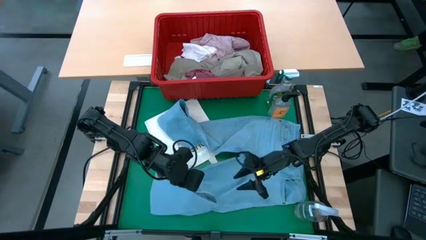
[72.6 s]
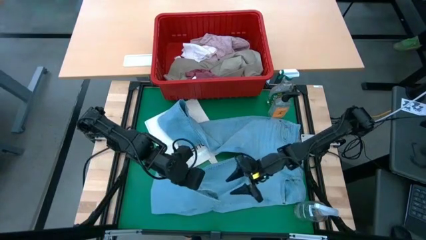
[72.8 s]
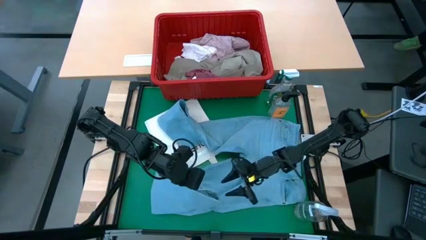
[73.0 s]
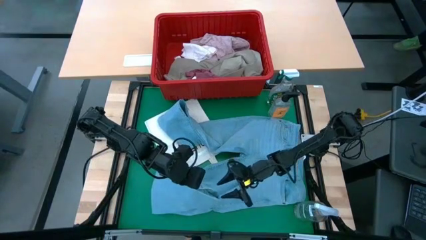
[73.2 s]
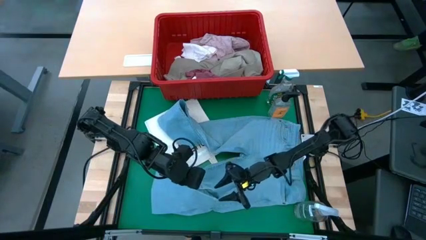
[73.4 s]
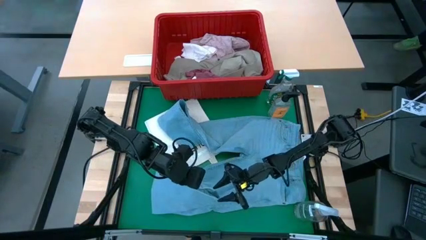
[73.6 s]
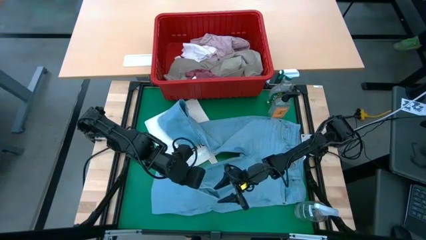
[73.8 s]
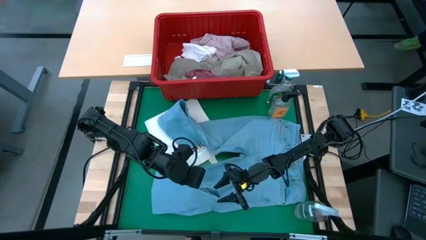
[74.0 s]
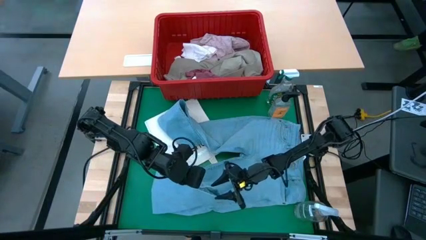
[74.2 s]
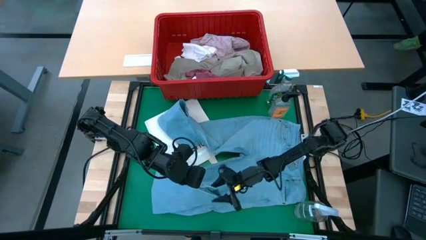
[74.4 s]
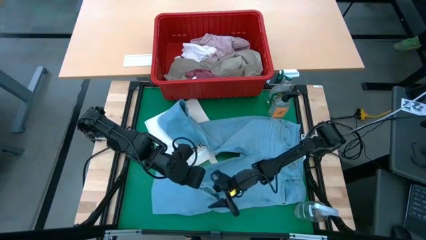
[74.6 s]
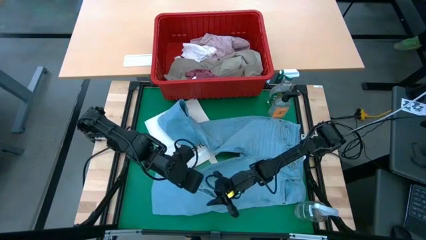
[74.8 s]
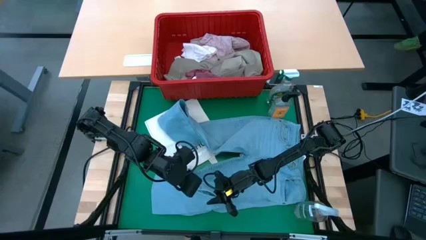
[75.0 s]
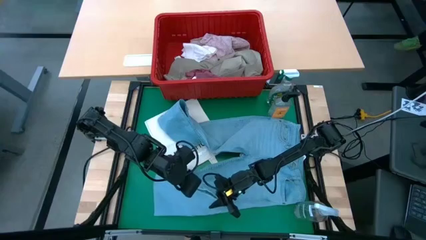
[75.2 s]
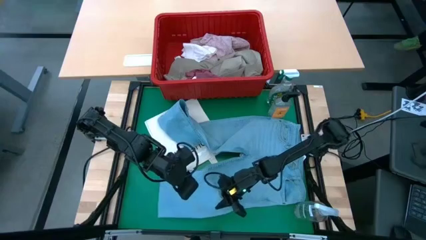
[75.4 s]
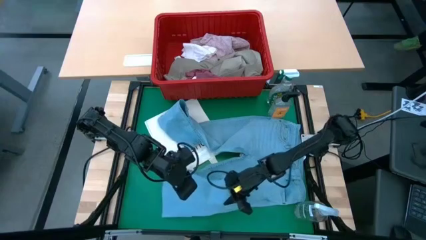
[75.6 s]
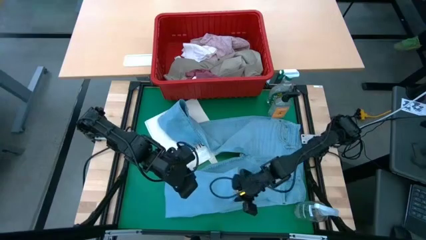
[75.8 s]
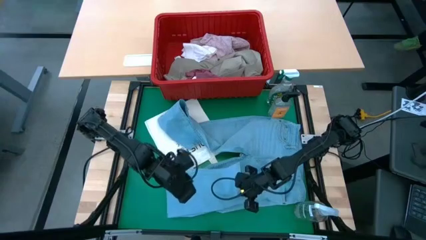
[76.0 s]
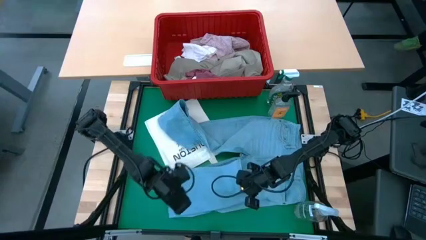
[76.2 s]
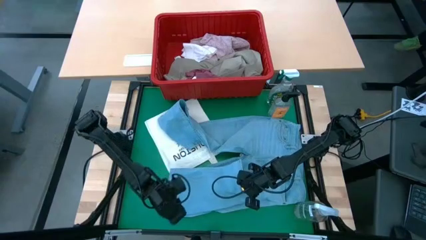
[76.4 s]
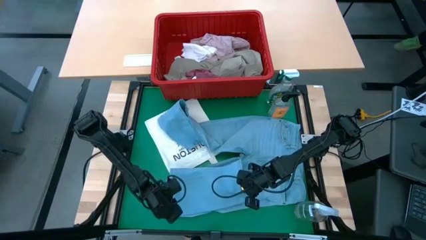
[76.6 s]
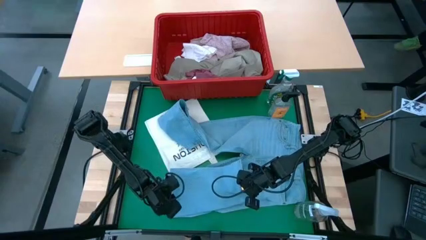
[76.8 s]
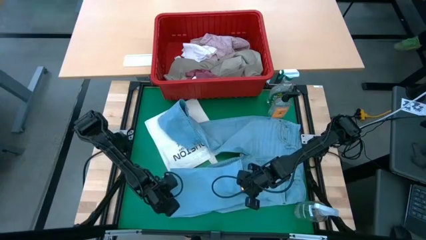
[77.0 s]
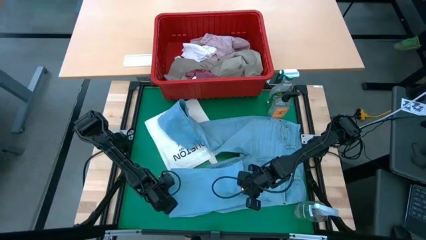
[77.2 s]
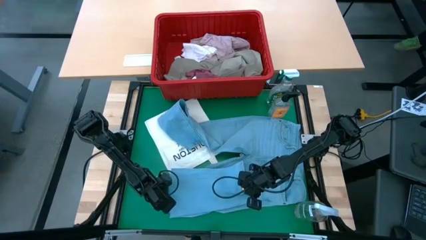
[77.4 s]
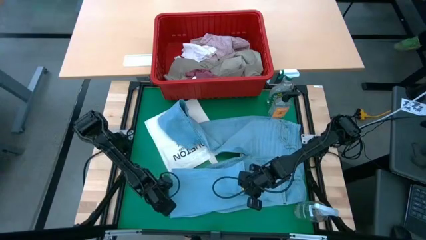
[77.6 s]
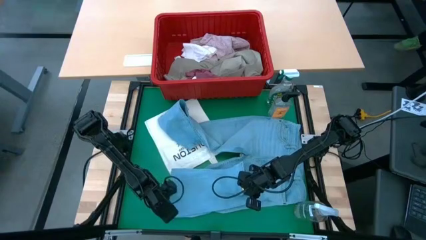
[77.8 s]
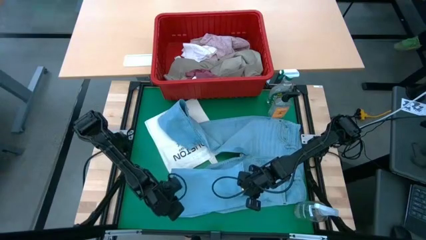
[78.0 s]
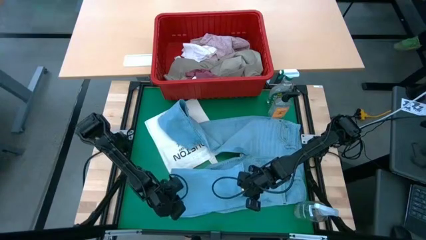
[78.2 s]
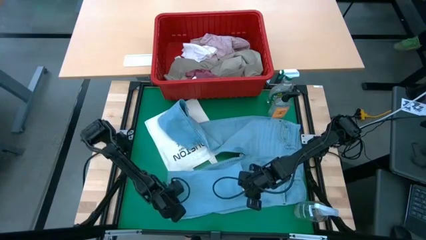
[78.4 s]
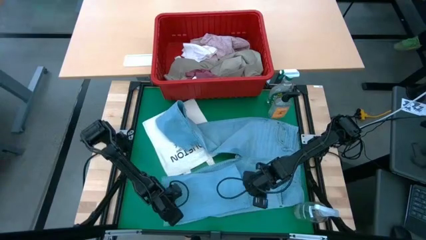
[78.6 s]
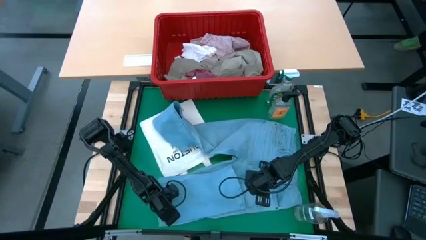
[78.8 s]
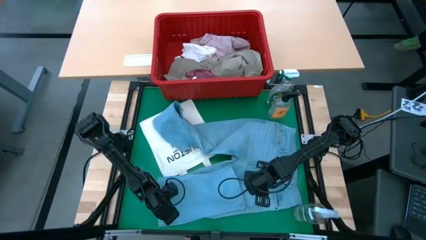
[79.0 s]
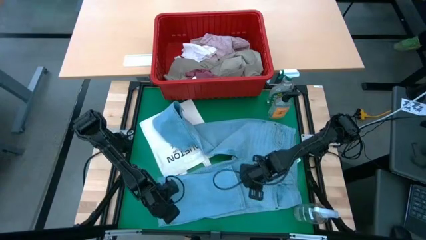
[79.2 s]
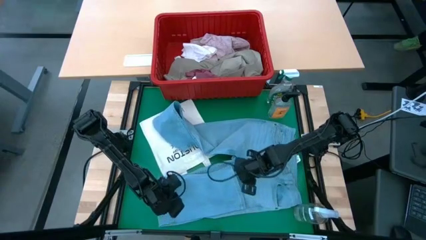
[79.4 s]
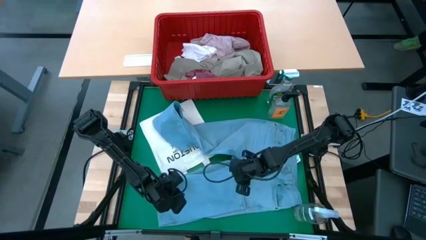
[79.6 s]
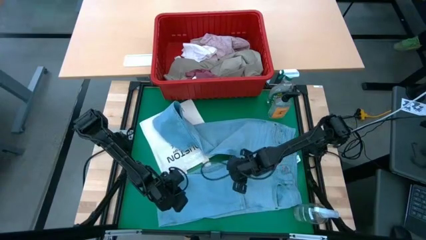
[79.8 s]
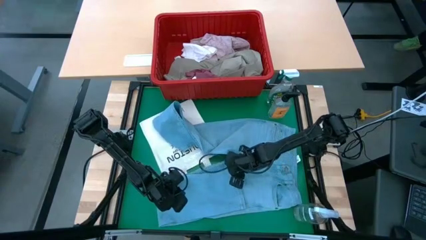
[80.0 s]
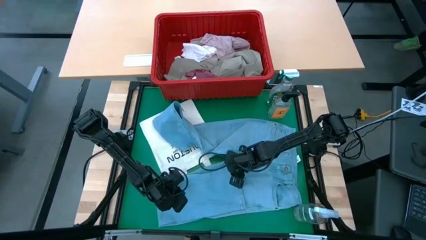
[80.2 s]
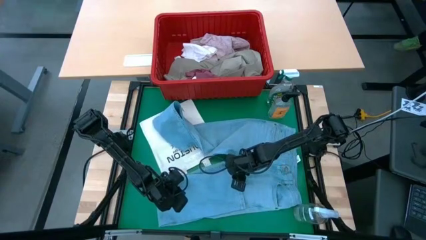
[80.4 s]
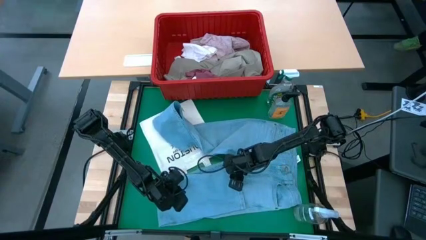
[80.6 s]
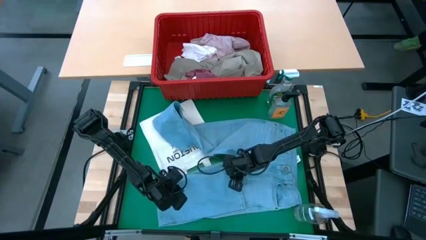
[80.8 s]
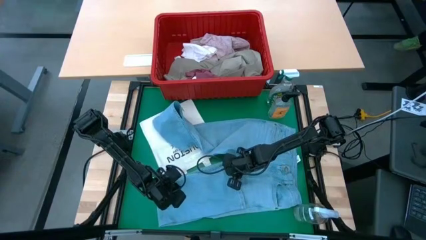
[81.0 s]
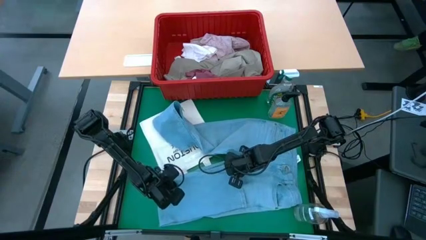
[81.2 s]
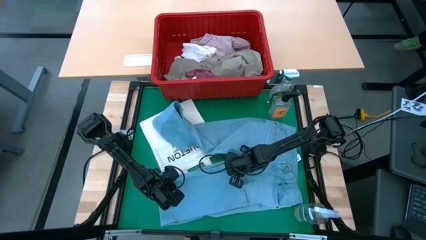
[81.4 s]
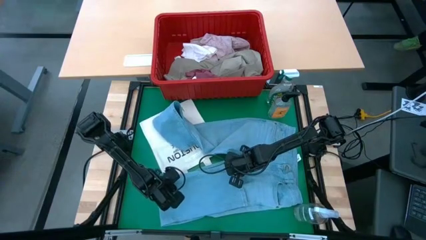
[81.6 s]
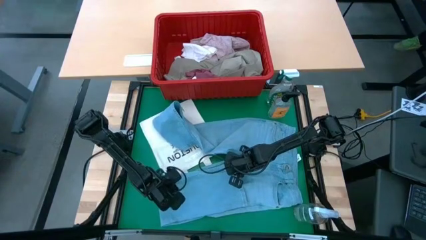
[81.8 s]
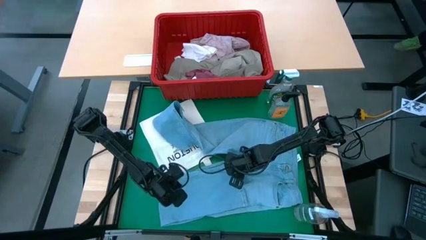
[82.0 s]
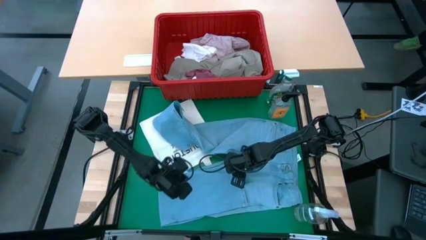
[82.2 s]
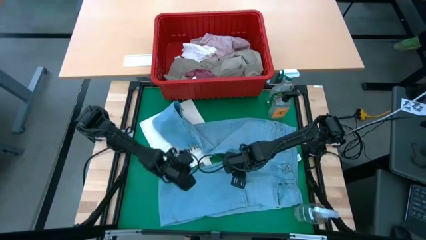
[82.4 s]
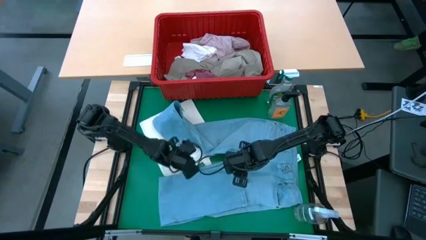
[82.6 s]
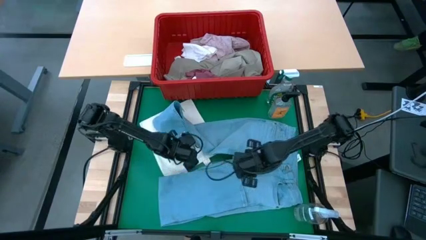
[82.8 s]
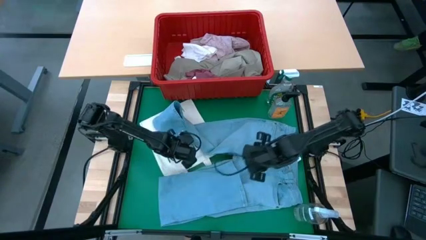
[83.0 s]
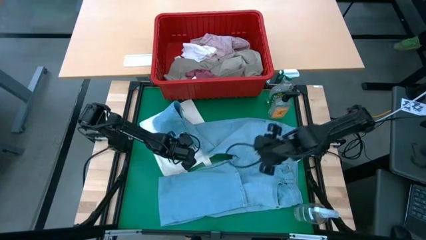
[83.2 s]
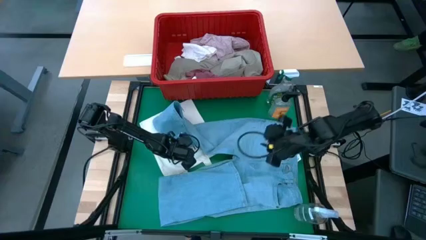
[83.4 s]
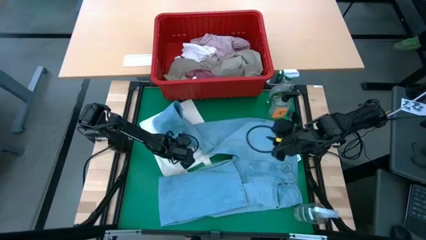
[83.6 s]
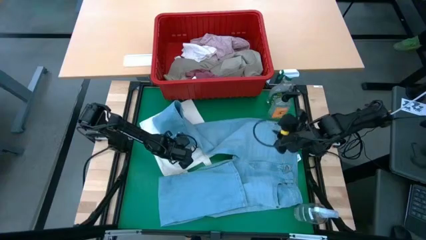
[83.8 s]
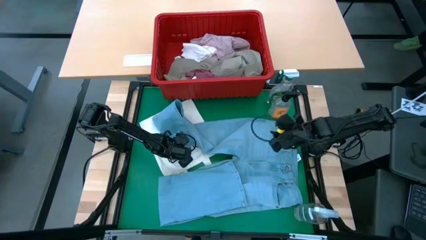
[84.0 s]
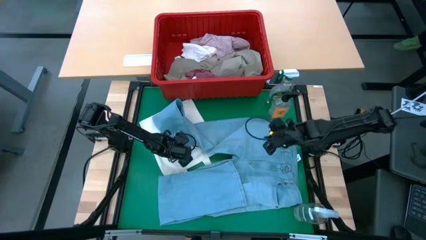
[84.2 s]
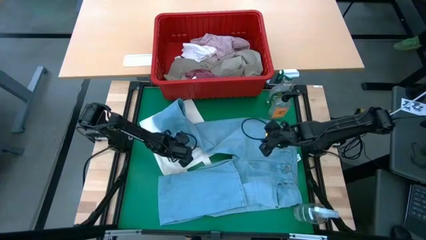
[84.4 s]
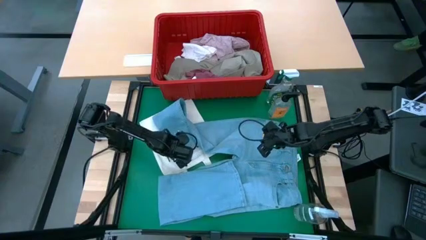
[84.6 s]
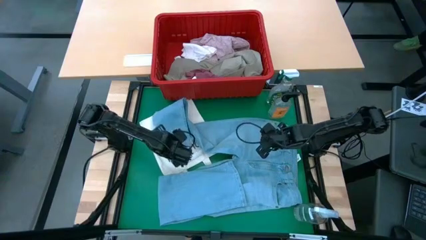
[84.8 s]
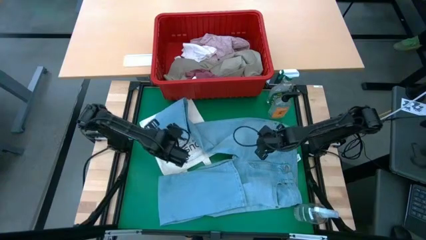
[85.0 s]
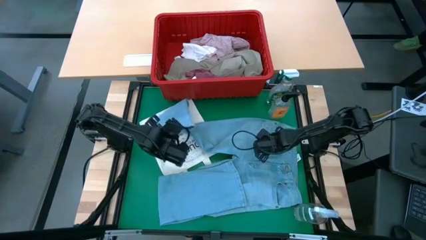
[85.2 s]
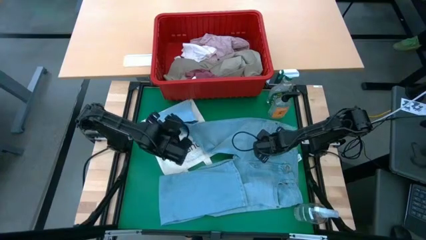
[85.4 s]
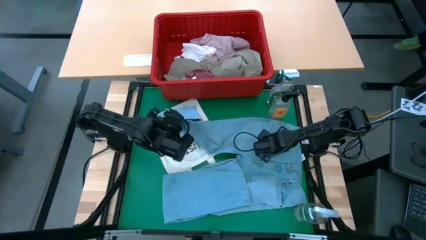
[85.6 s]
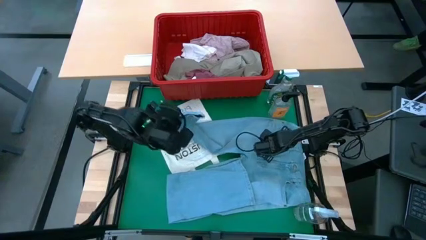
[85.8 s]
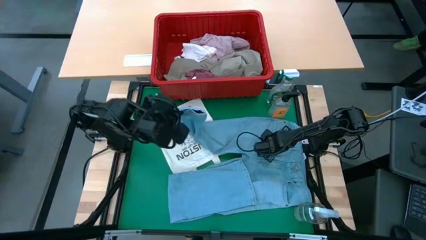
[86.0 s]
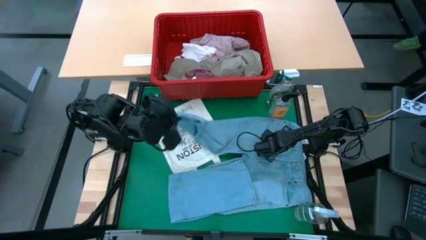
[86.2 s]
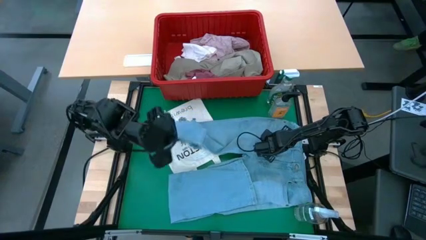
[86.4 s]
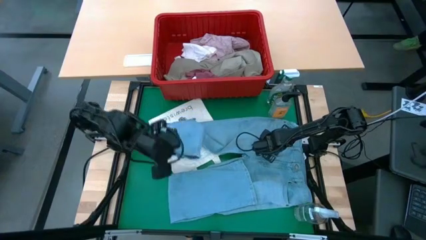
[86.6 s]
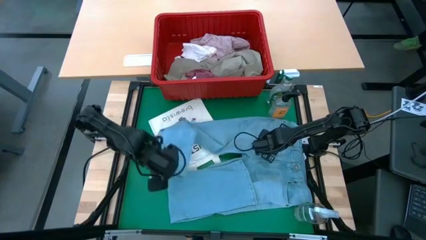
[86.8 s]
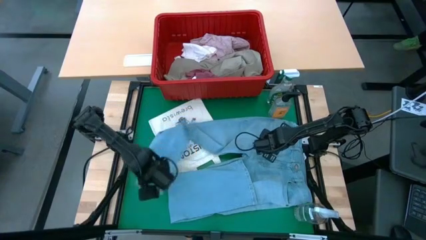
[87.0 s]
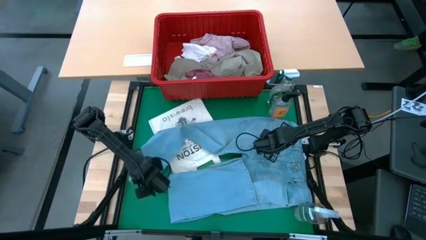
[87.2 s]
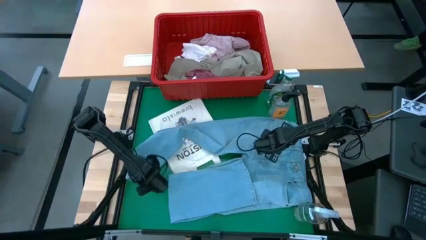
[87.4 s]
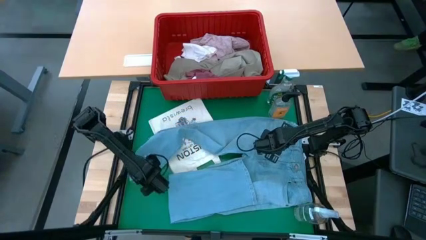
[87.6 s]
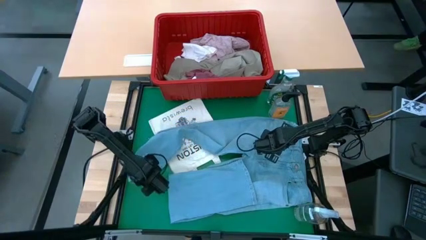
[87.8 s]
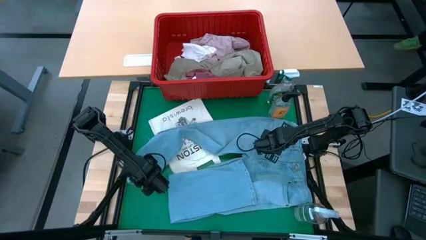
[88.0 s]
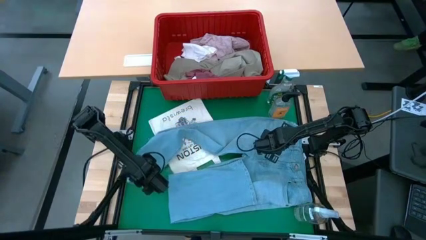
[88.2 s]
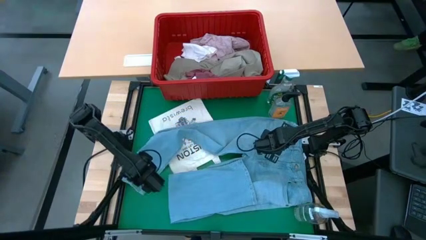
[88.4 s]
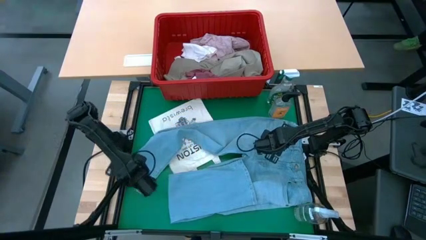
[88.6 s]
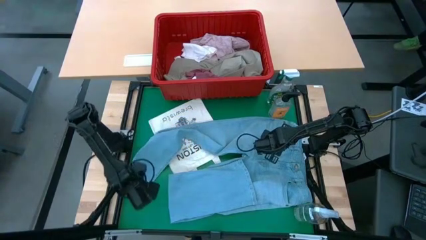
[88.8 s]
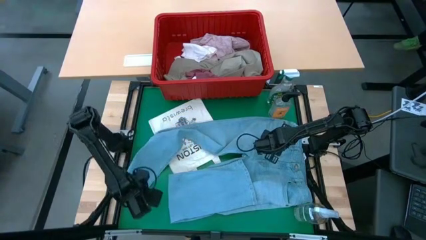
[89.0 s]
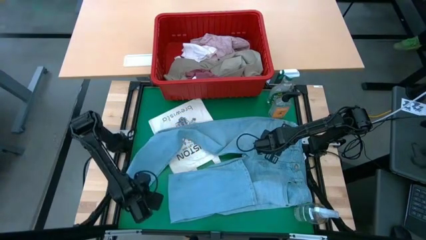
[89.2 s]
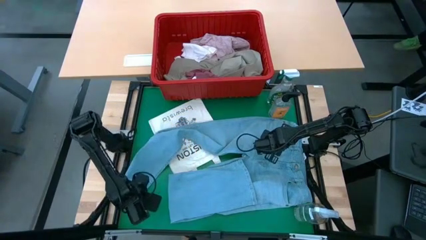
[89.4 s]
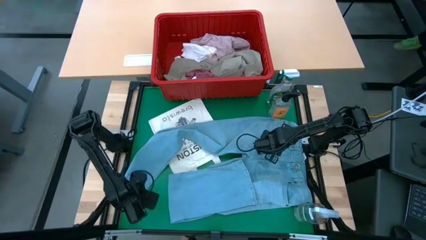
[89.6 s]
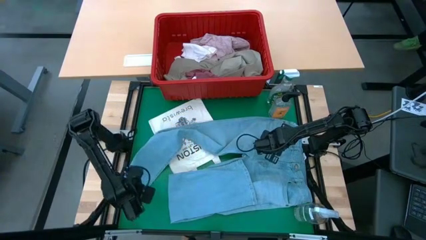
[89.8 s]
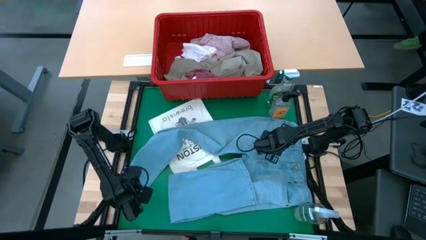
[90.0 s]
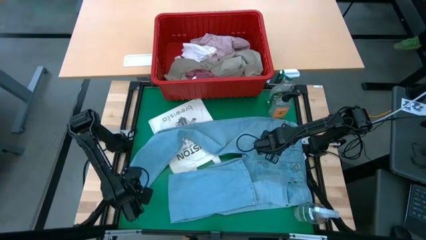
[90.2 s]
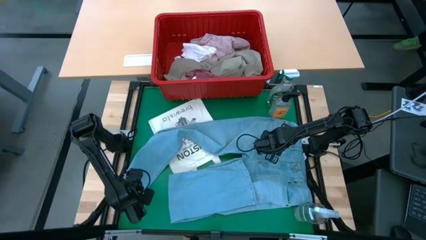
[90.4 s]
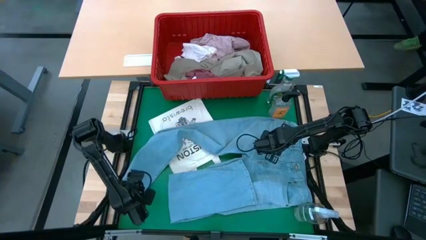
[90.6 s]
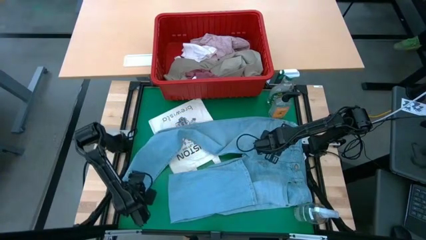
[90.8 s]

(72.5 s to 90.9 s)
Task: Fold laundry
Fold the light blue pants
